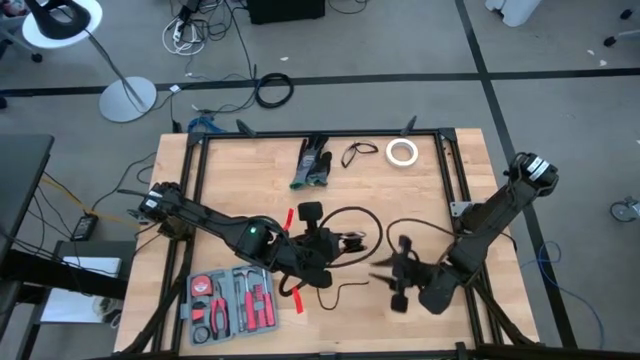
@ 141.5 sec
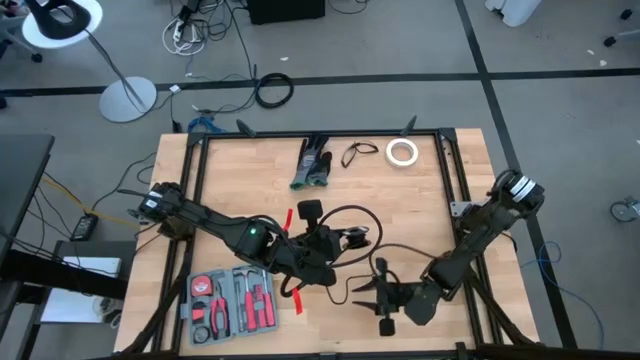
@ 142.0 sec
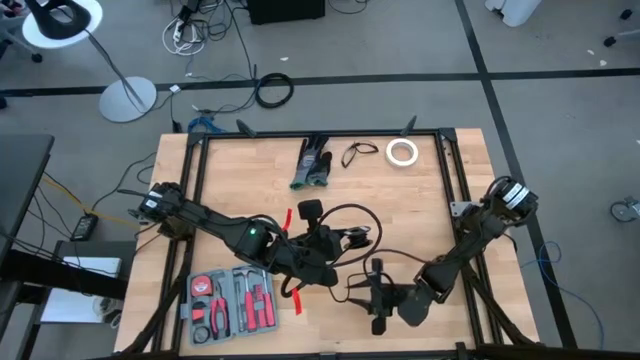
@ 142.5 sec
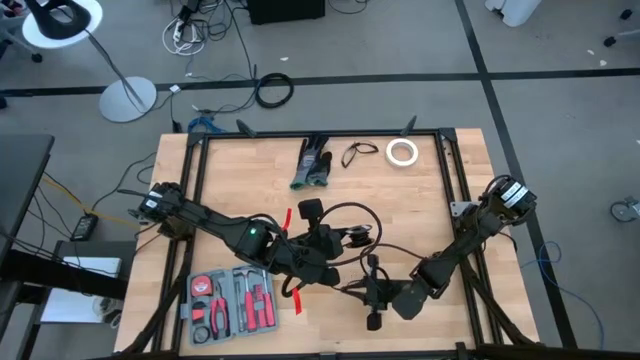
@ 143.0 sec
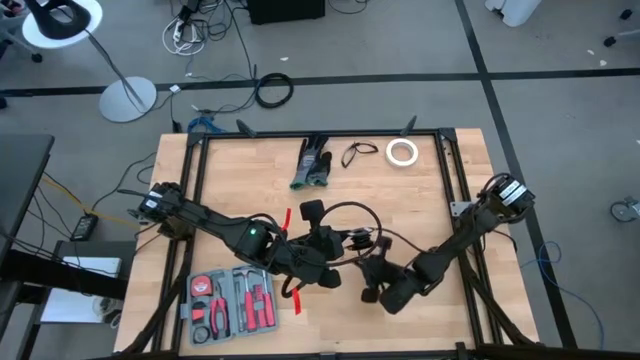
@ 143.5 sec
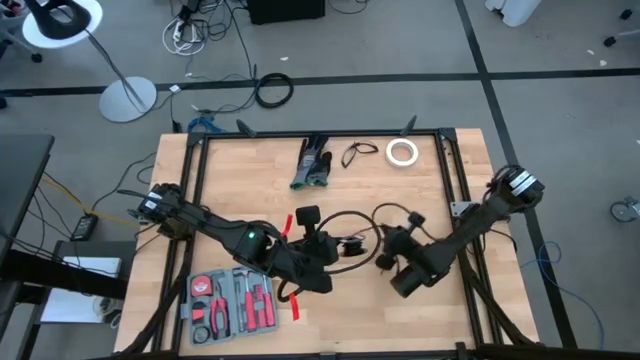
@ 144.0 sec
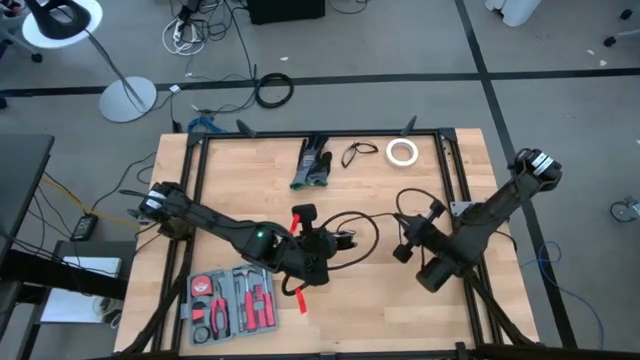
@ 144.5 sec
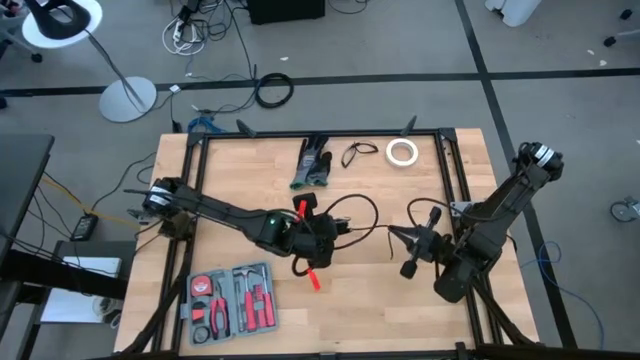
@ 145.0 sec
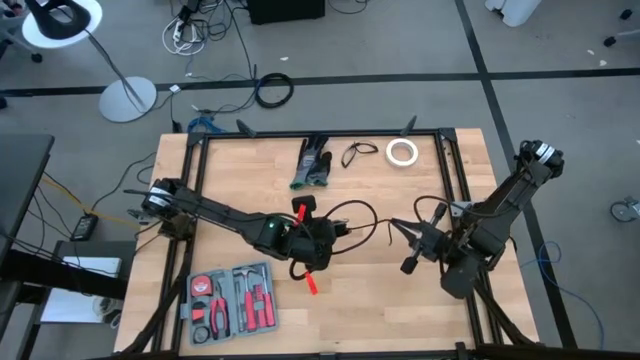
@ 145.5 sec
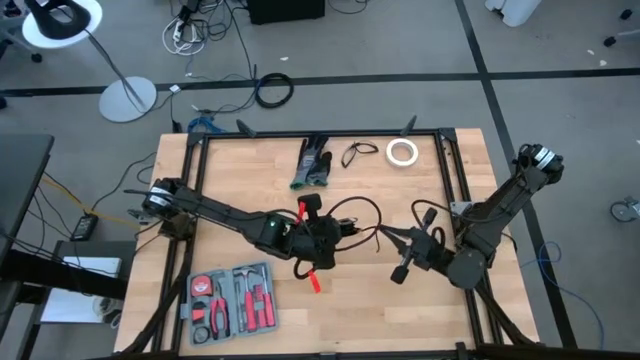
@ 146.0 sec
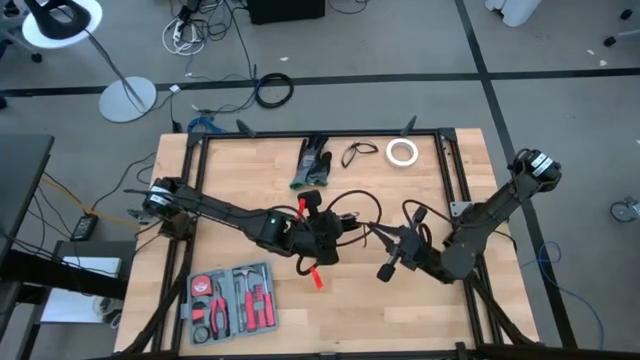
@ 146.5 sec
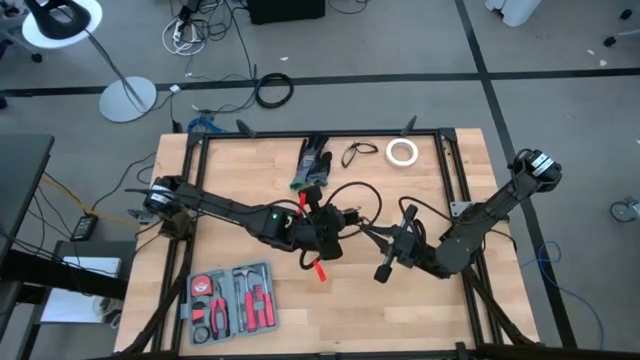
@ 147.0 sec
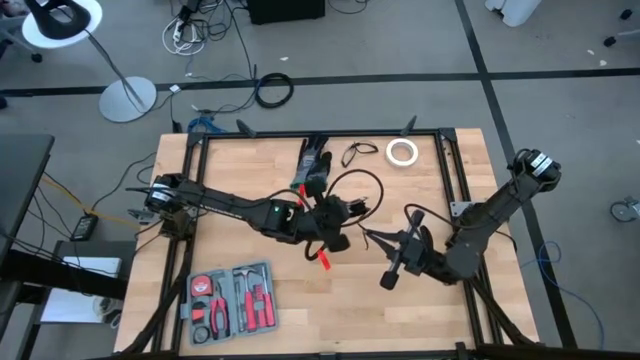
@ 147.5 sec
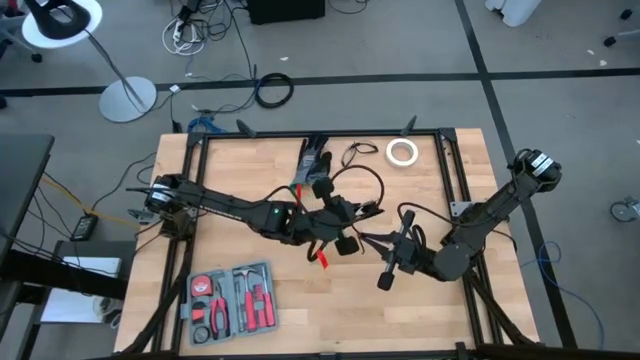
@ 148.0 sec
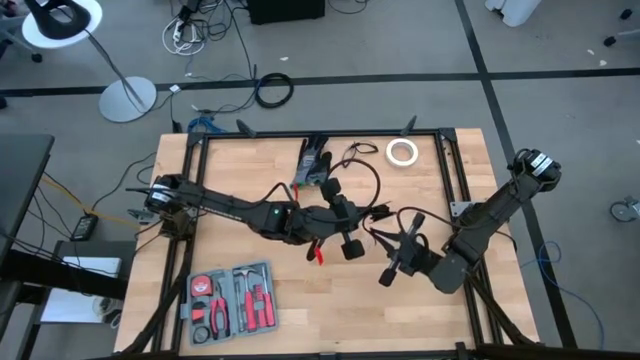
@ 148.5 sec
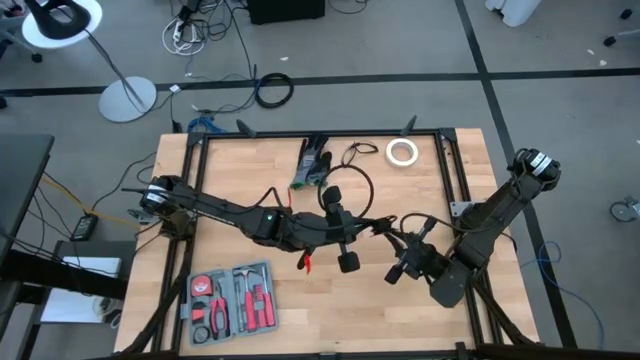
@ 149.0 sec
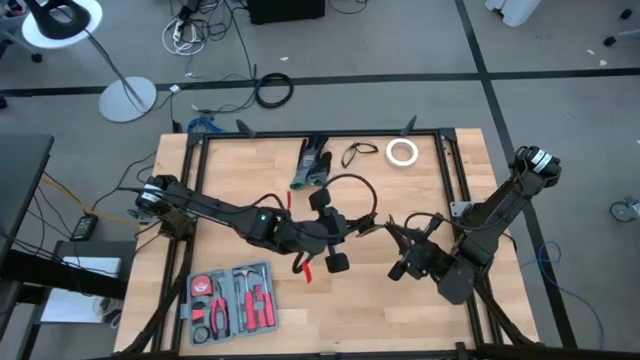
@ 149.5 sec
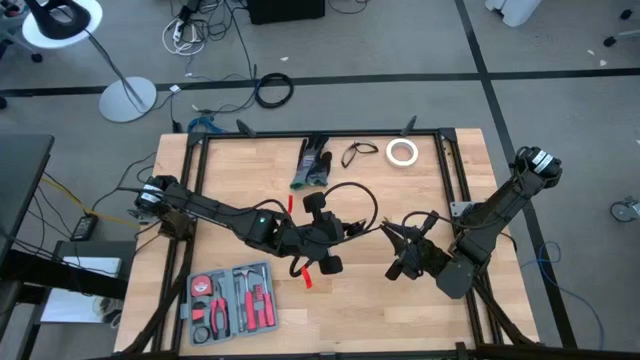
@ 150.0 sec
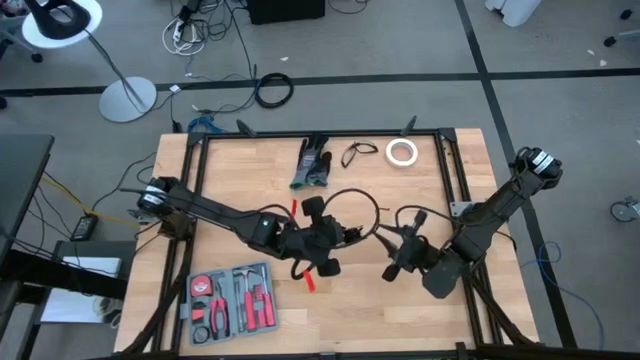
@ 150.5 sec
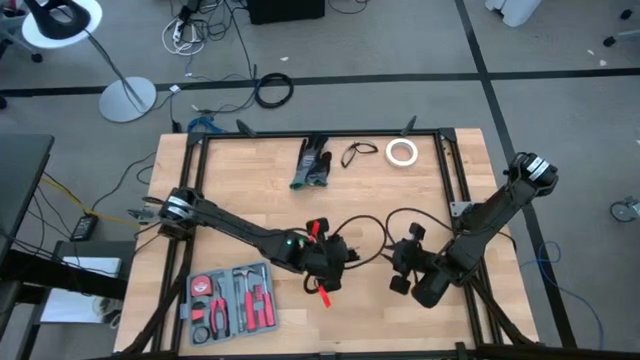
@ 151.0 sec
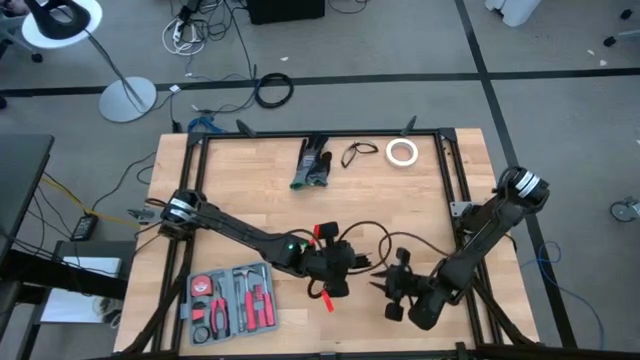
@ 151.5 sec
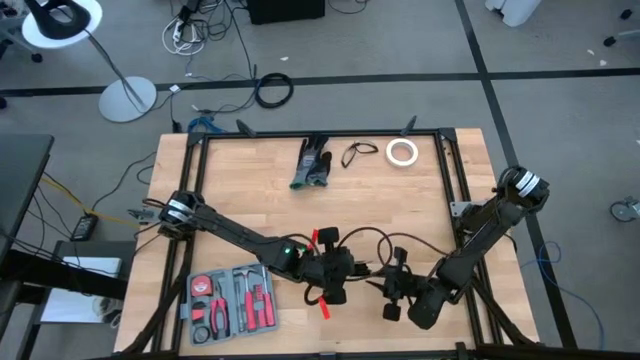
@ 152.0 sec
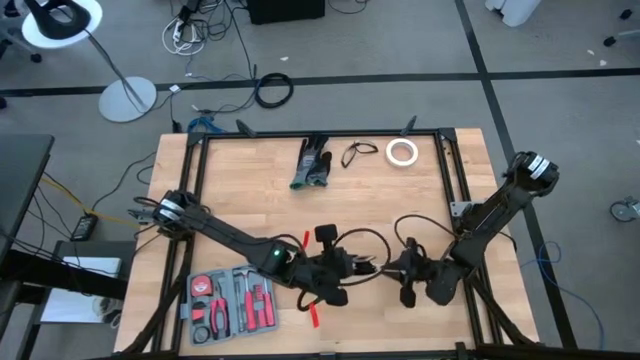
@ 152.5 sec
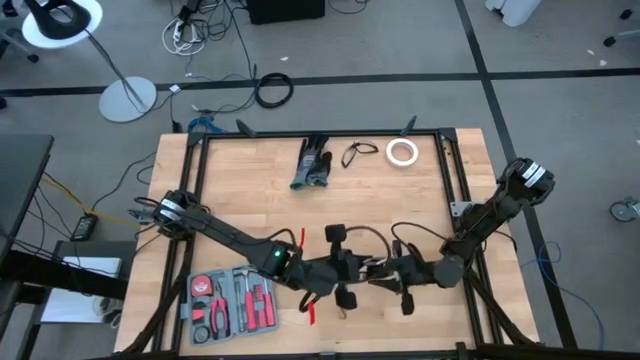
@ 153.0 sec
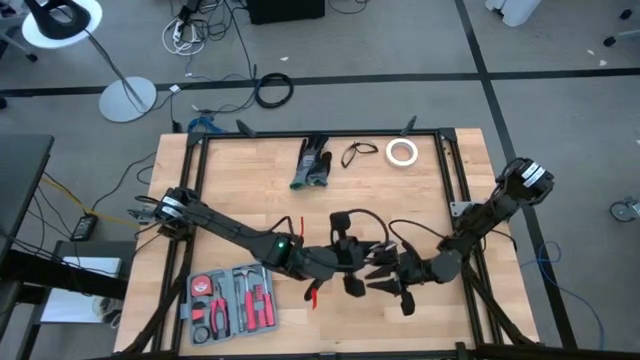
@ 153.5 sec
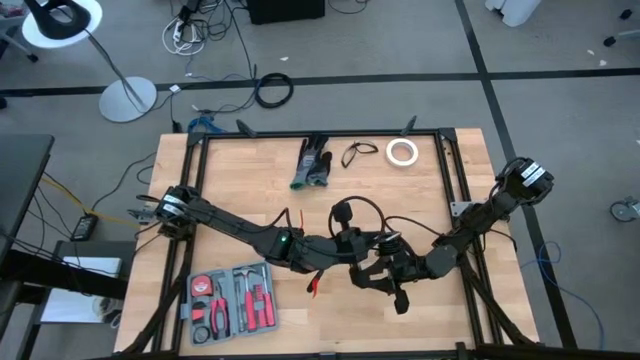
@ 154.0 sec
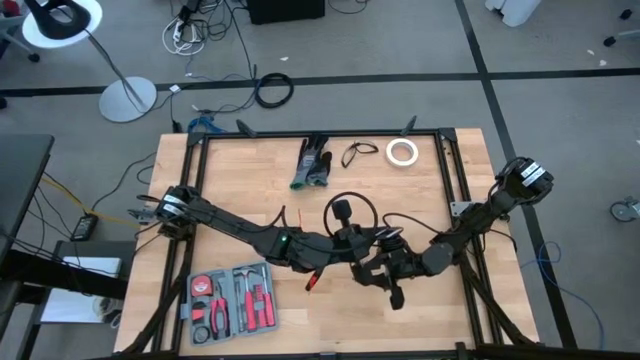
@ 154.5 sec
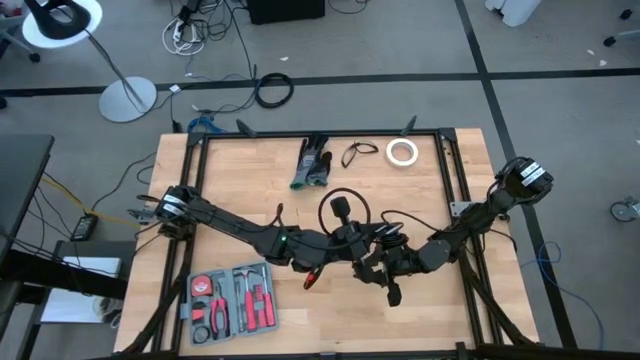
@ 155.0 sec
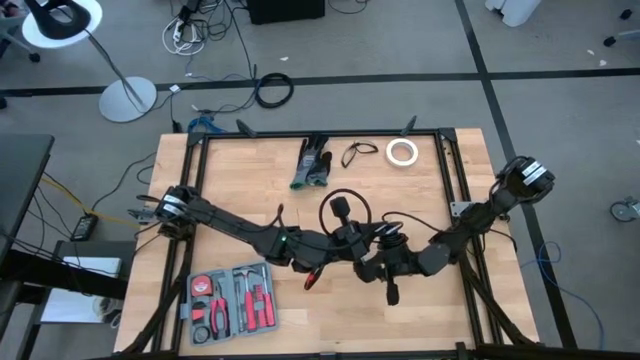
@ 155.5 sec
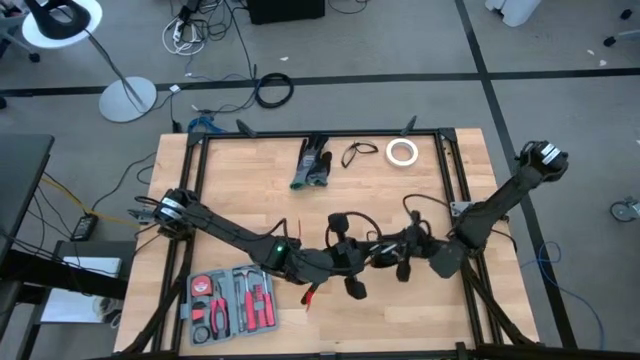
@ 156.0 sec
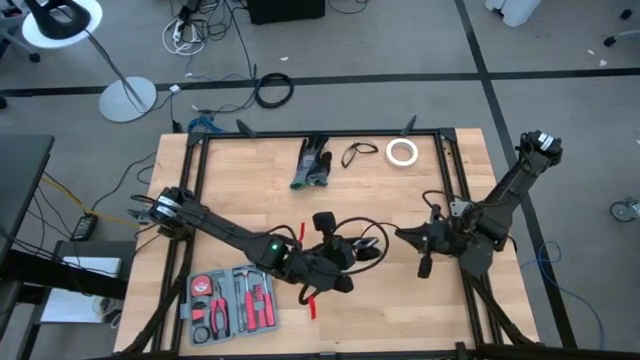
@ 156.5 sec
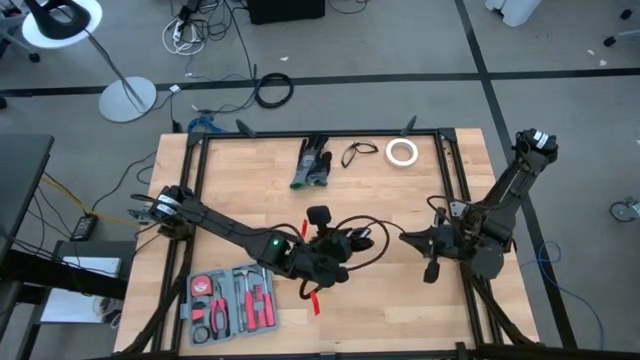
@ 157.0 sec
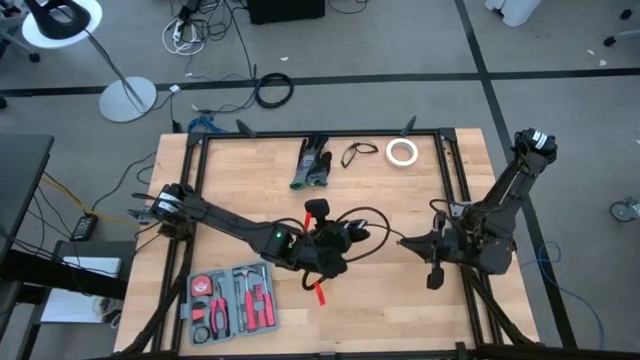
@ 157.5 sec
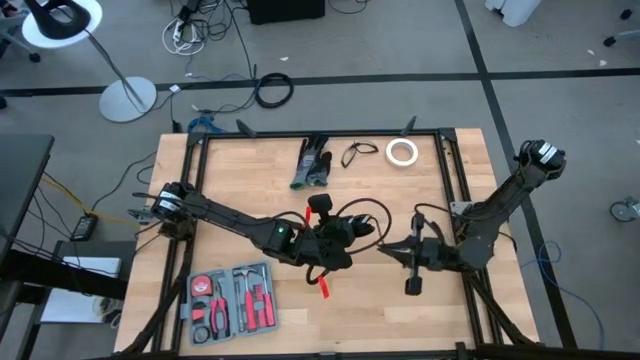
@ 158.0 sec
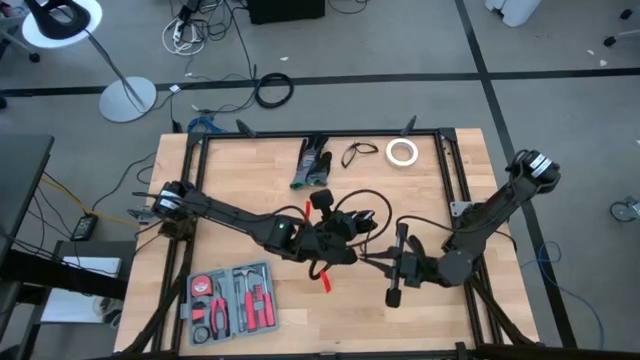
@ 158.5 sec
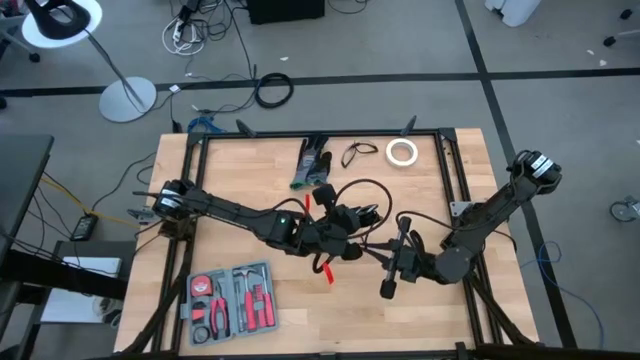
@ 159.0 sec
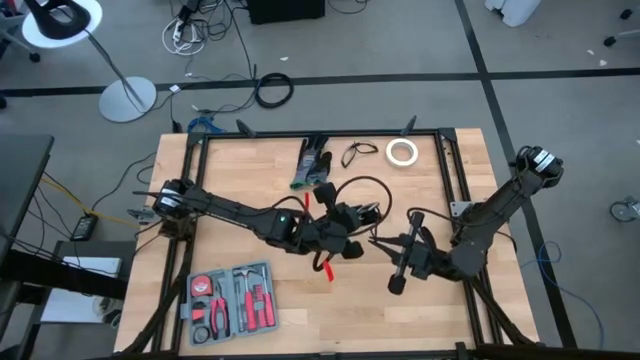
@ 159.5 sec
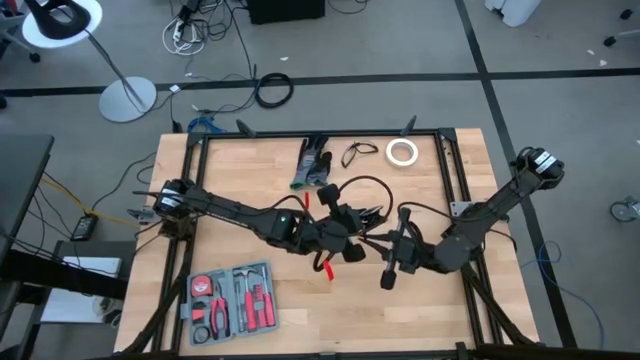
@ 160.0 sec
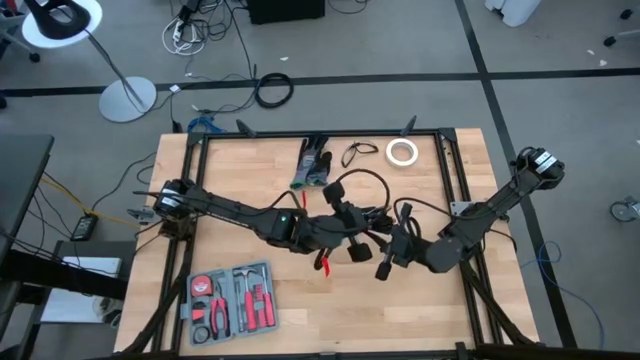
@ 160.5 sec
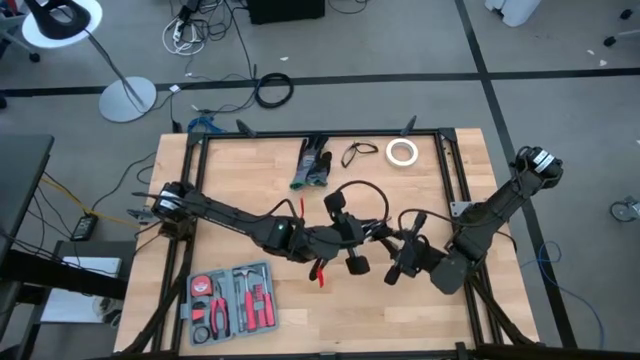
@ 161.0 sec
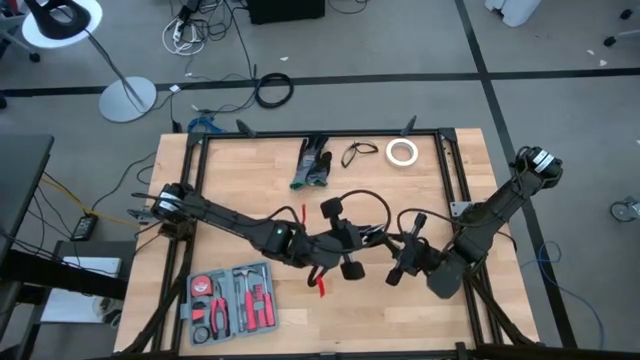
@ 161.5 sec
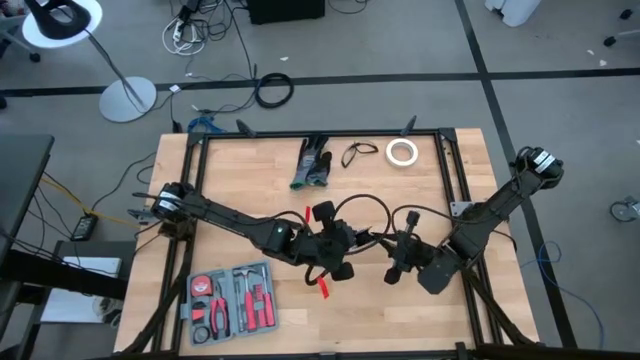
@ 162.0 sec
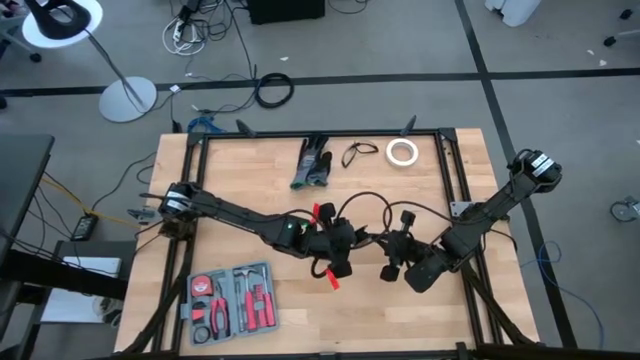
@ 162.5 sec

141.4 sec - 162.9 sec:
Task: Coil cords
Coil the black wire into a spool

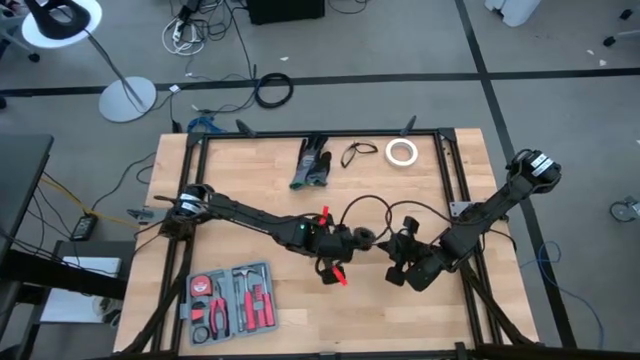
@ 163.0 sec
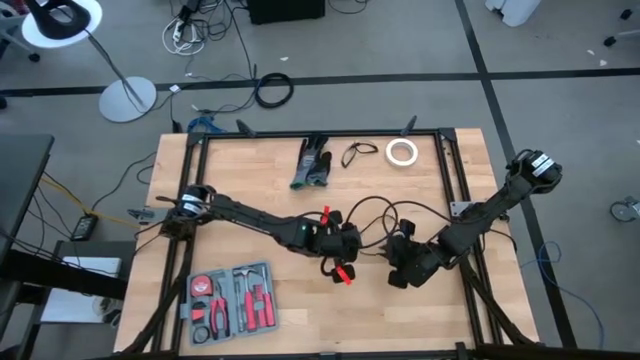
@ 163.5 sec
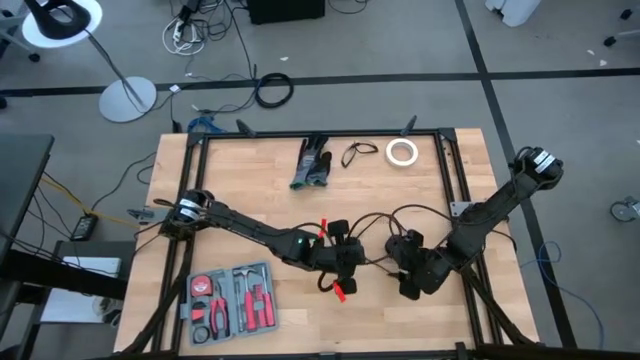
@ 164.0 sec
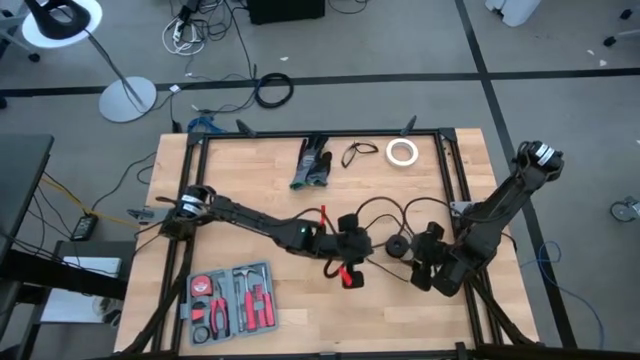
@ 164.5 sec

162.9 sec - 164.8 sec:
Coil the black wire into a spool
